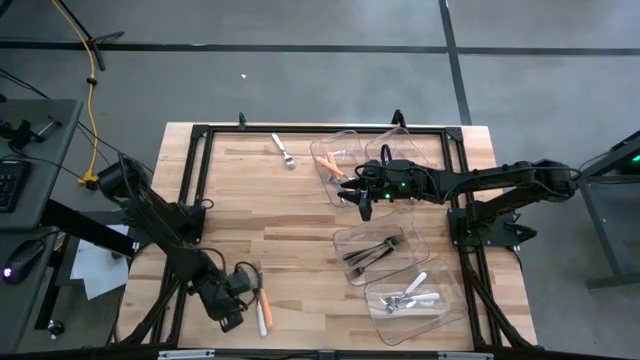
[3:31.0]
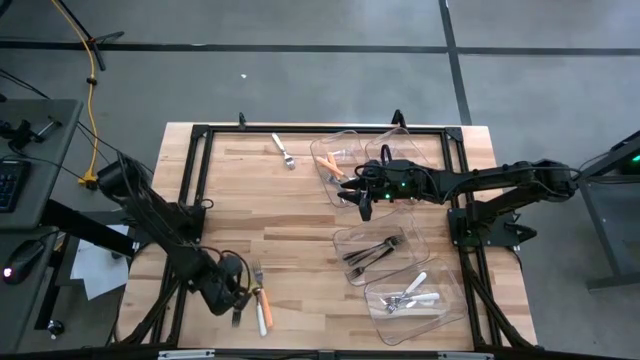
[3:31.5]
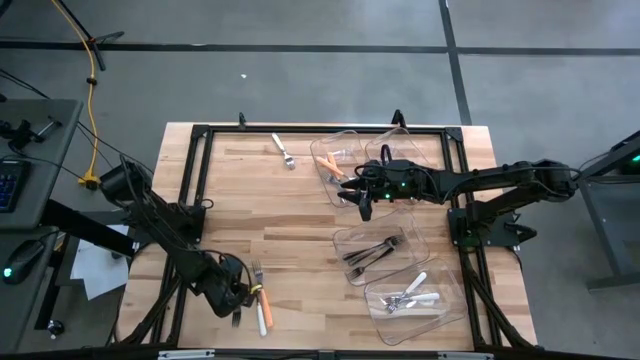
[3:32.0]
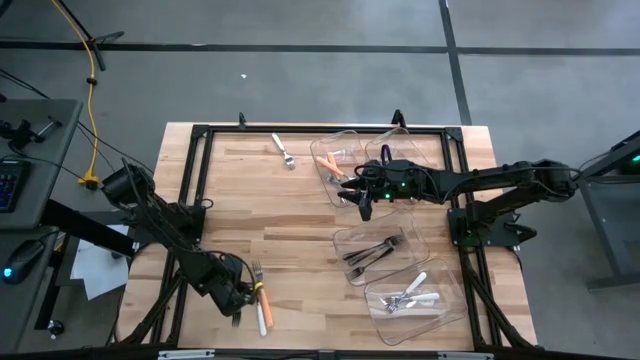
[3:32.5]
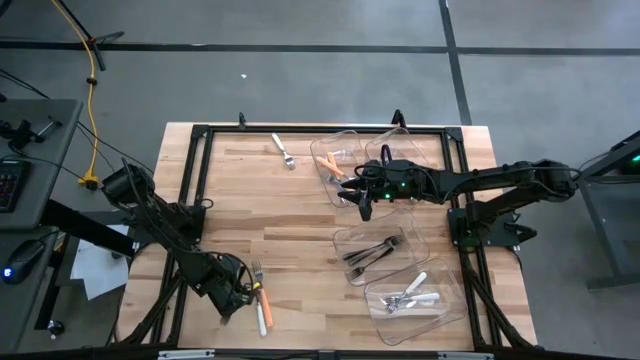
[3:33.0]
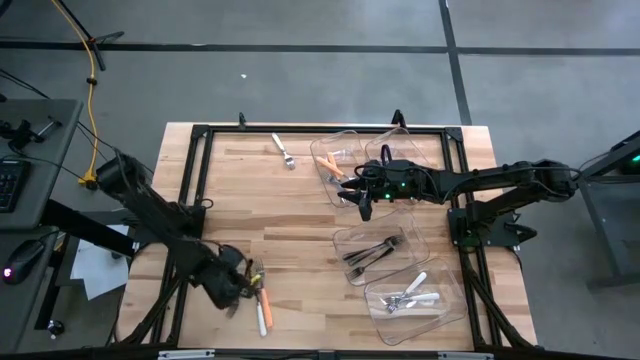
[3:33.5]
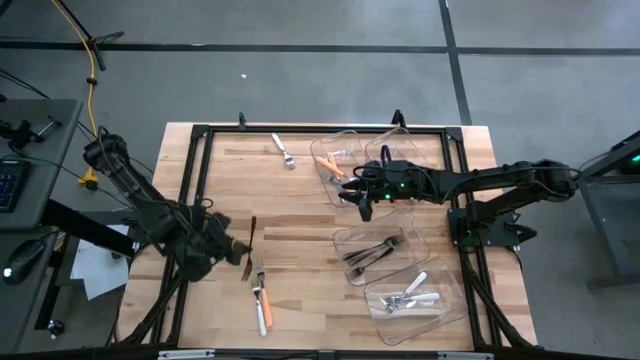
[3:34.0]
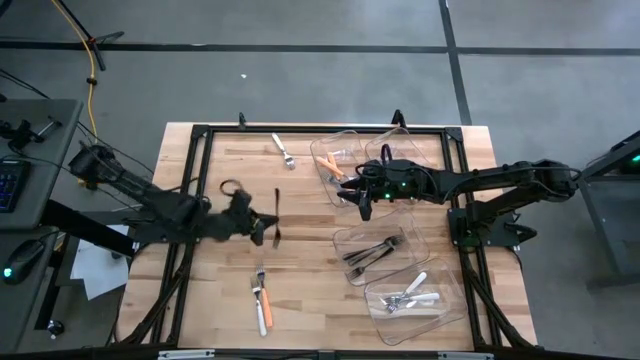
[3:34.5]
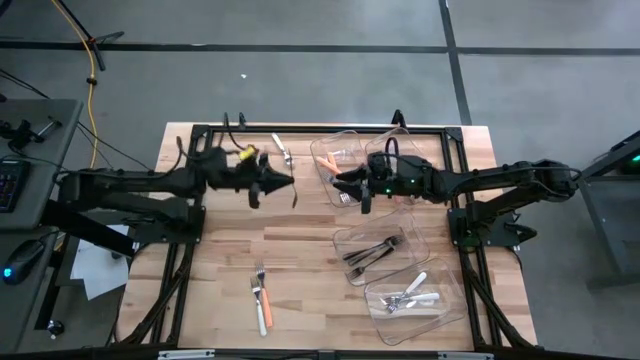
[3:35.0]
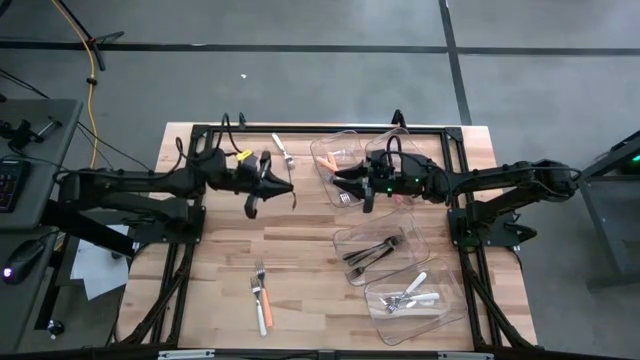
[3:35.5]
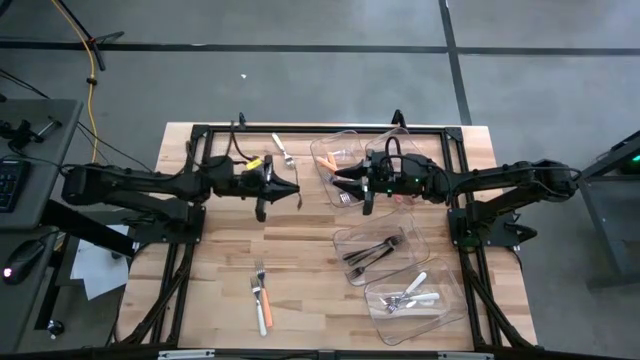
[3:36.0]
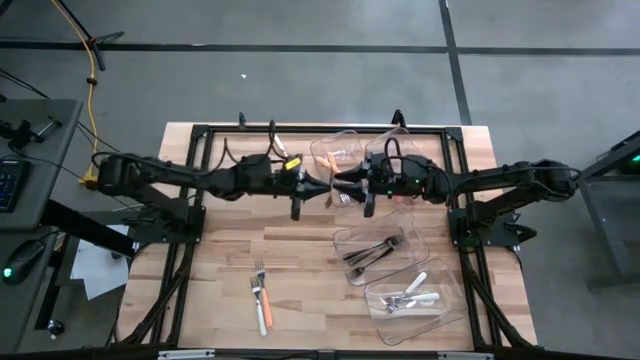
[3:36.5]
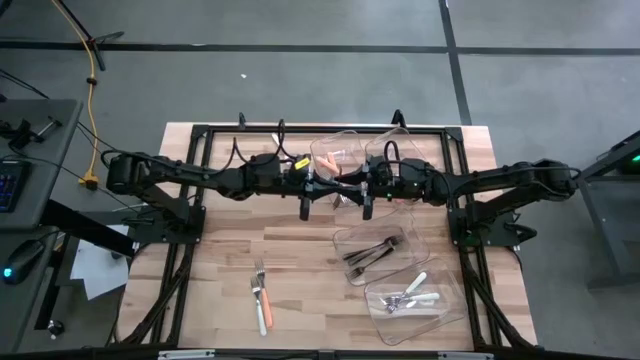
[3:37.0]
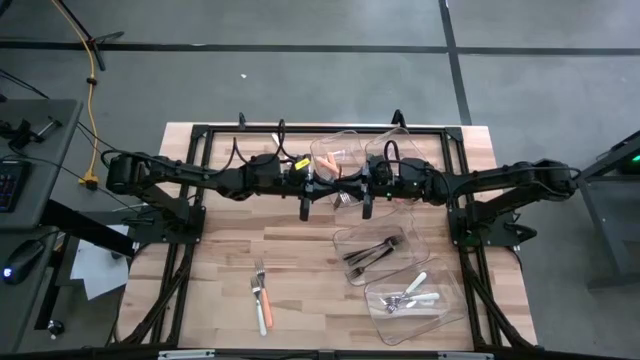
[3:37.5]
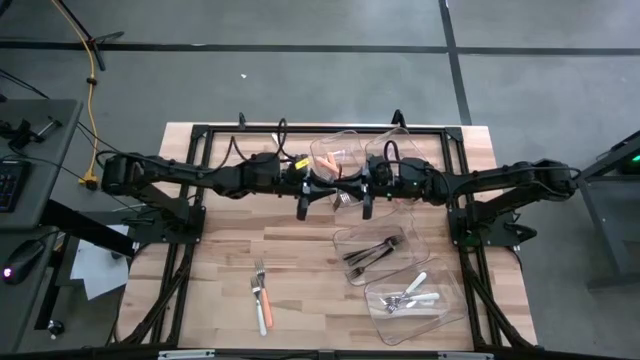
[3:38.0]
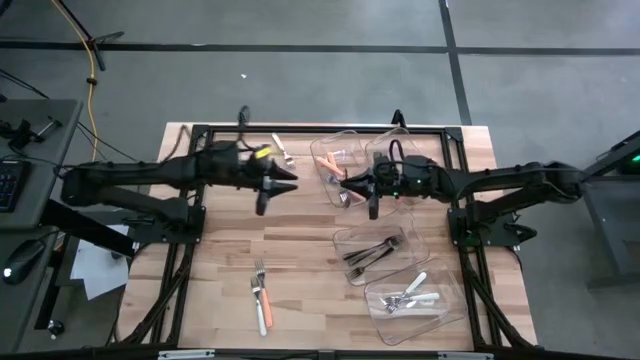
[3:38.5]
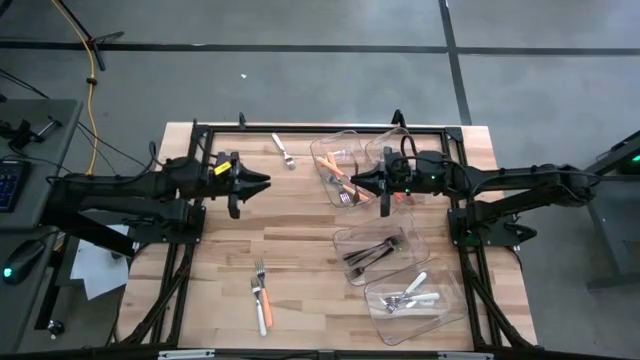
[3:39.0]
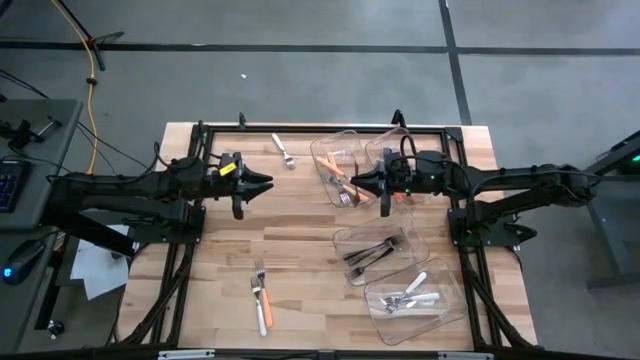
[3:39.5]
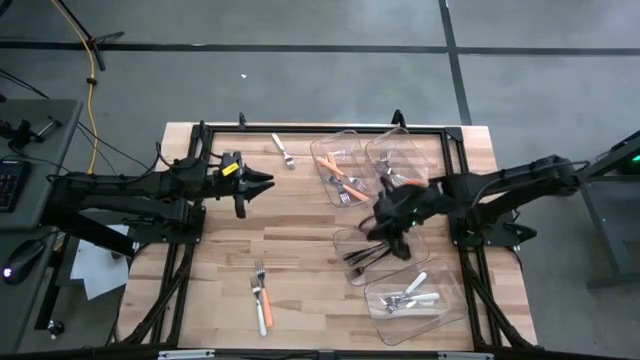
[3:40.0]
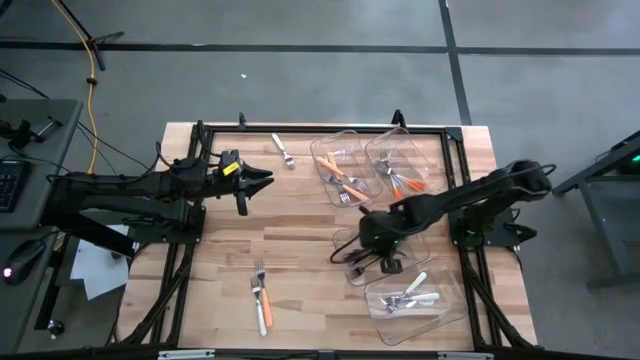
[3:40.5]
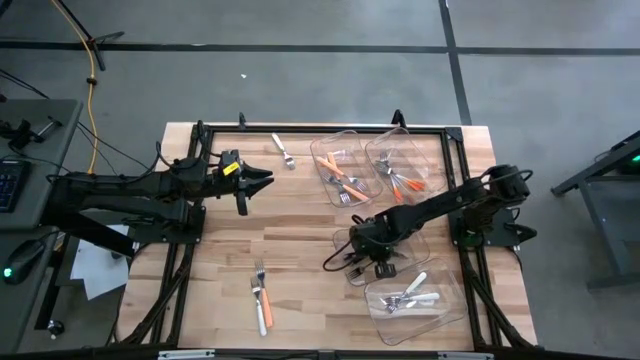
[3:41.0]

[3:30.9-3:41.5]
Task: Sort silverware by color (type)
Put the black fork into the top transparent bin

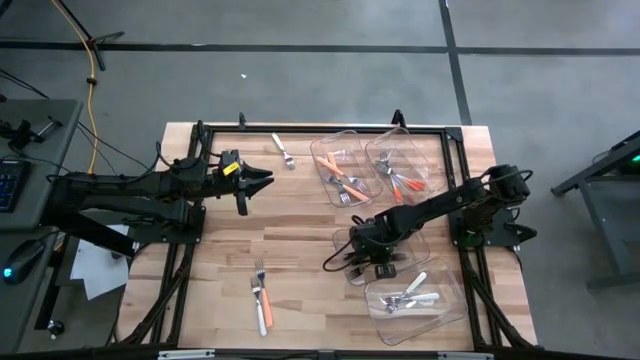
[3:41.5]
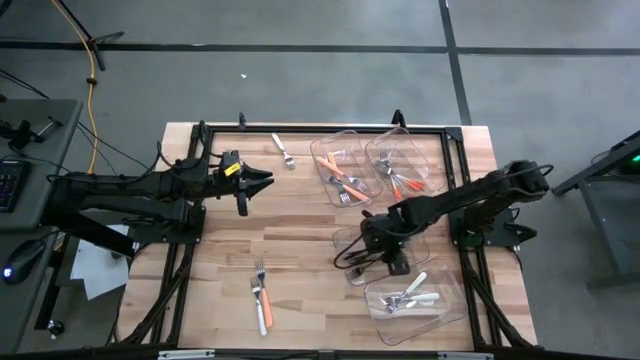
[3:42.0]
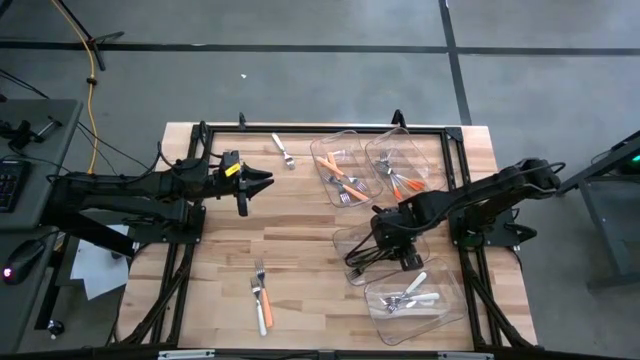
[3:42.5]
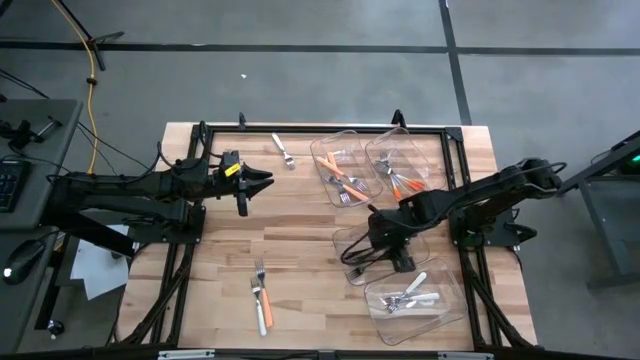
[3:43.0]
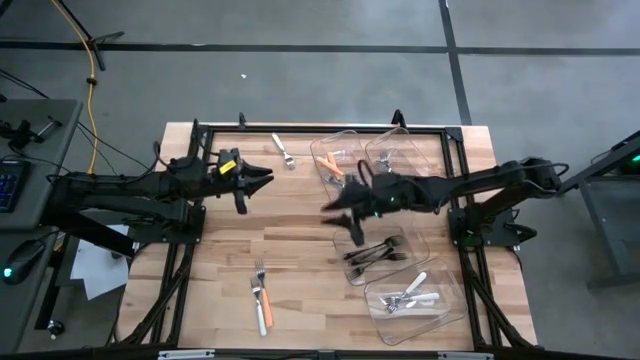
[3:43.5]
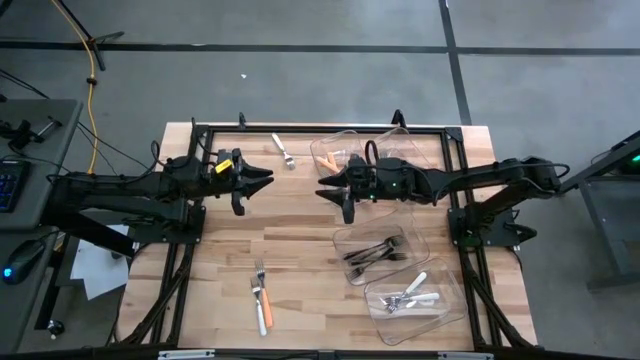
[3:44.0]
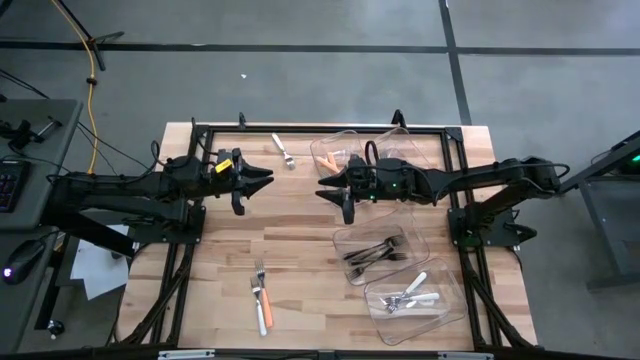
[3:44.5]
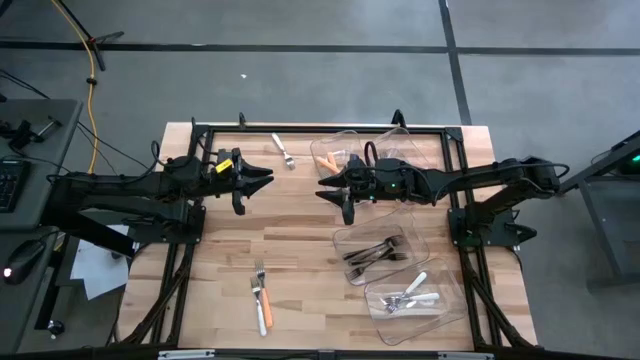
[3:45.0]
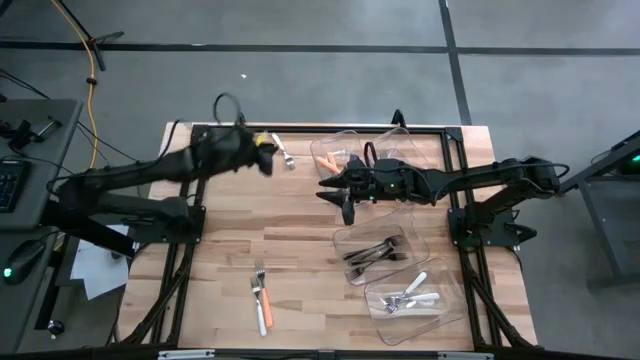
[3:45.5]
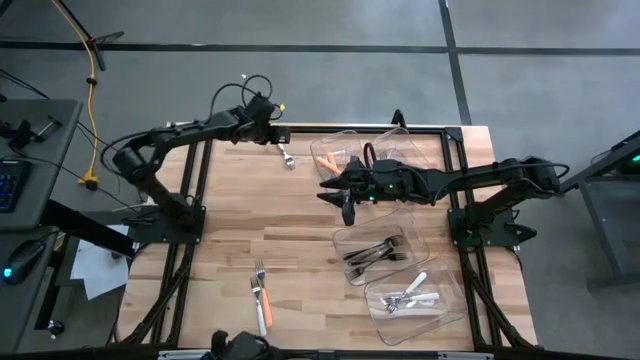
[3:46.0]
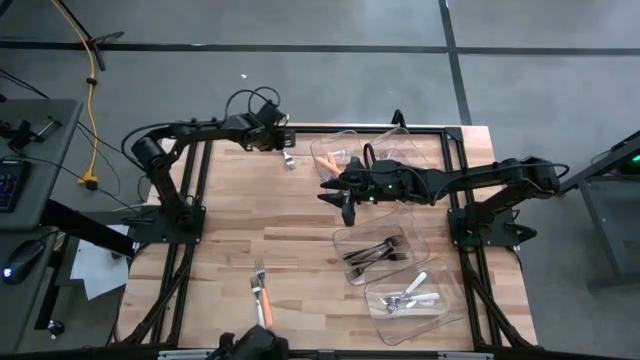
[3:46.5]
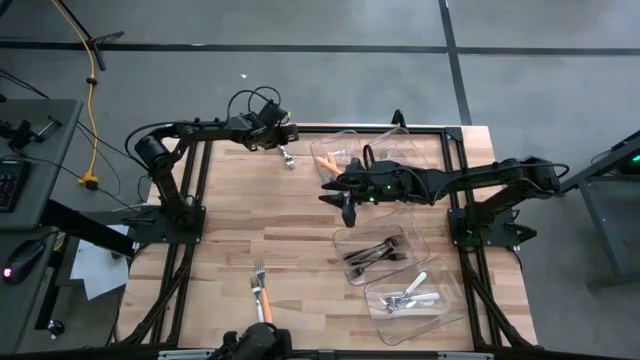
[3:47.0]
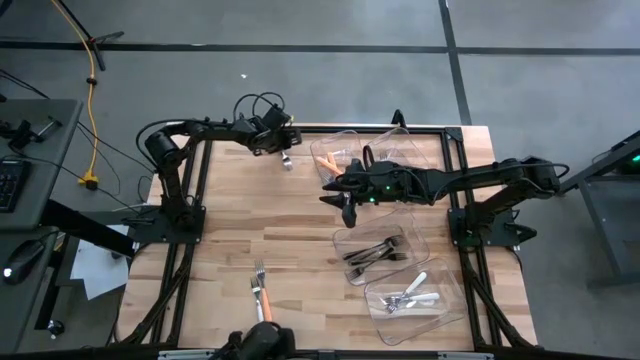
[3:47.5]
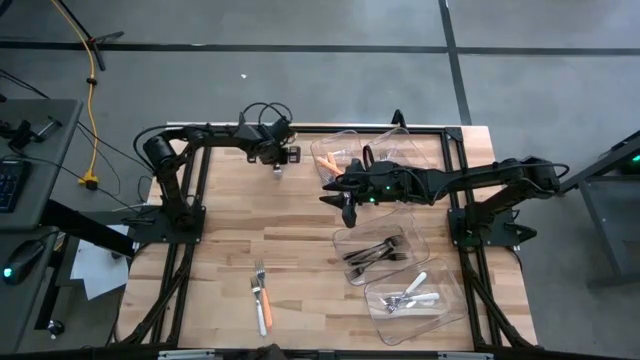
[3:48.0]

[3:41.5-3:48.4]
Move the top white fork to the bottom

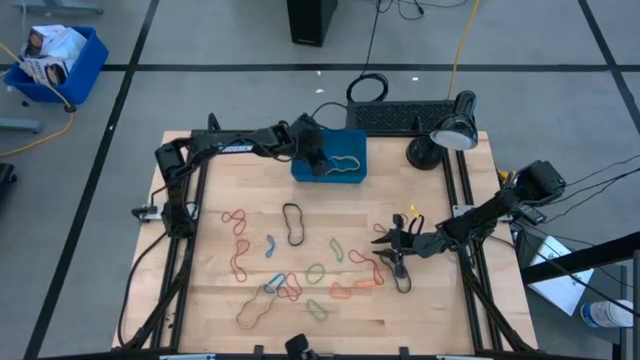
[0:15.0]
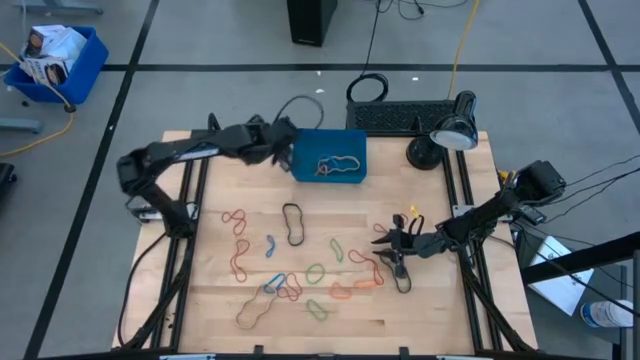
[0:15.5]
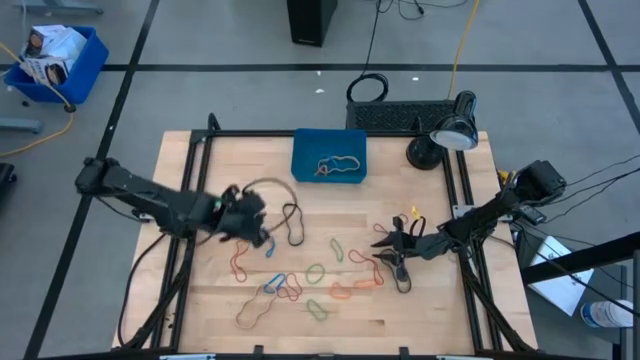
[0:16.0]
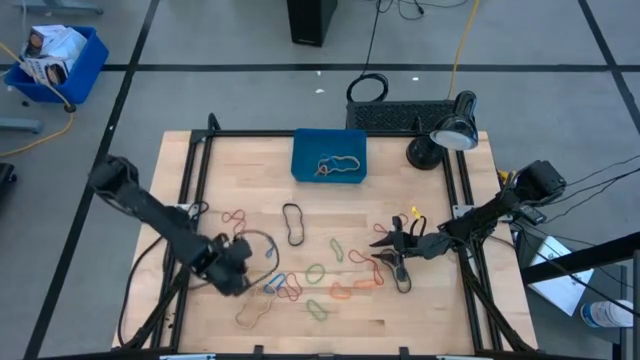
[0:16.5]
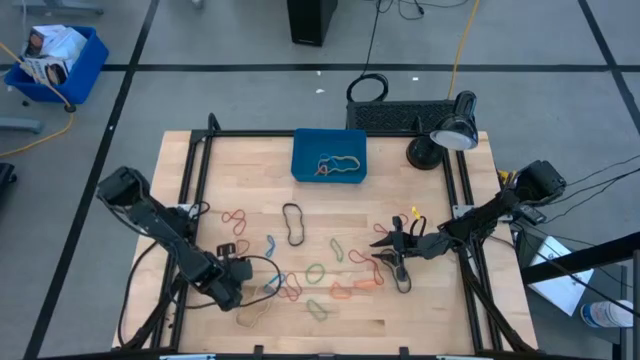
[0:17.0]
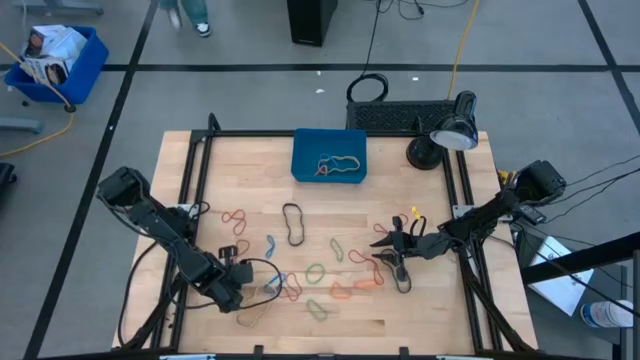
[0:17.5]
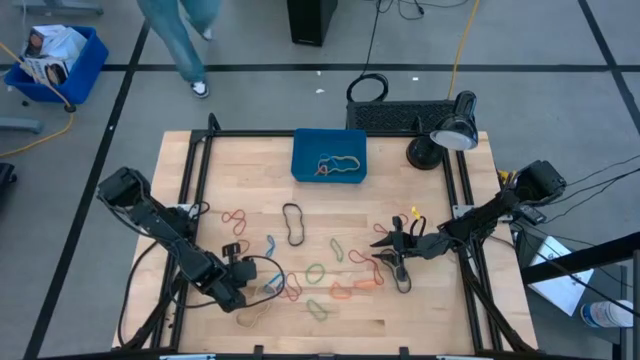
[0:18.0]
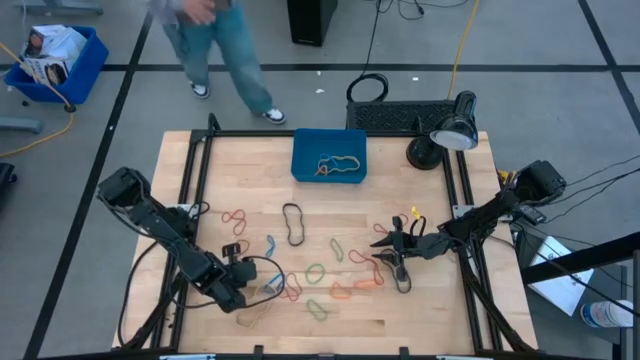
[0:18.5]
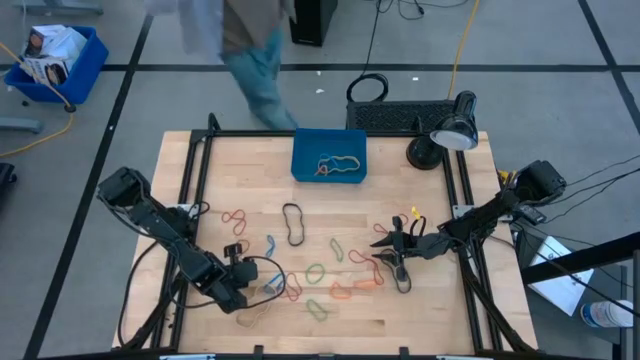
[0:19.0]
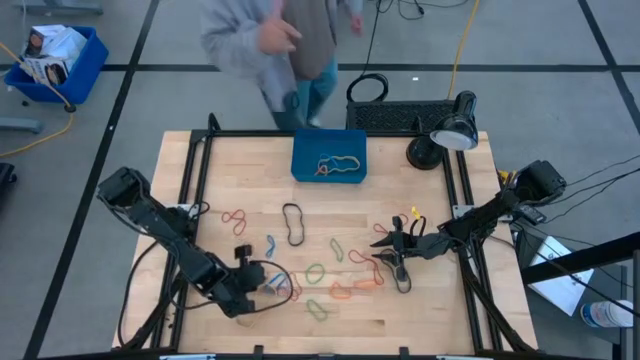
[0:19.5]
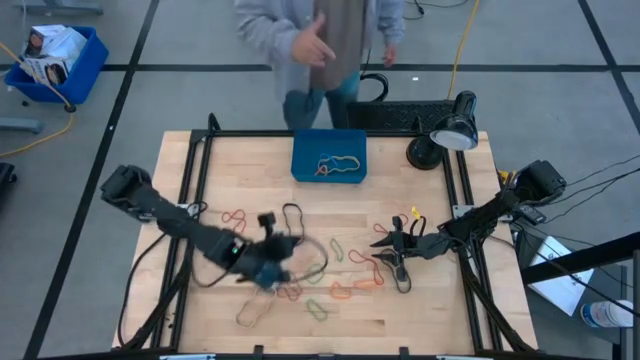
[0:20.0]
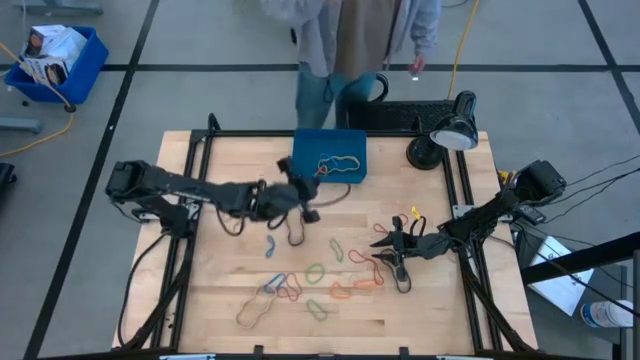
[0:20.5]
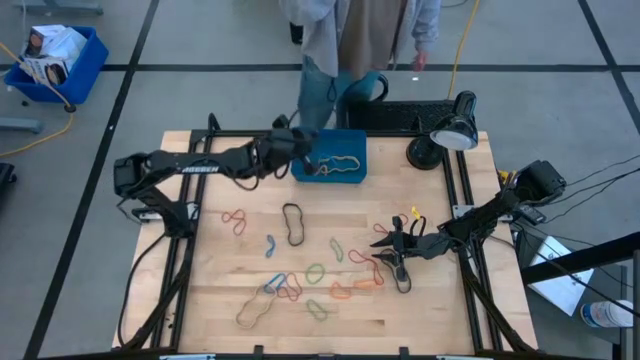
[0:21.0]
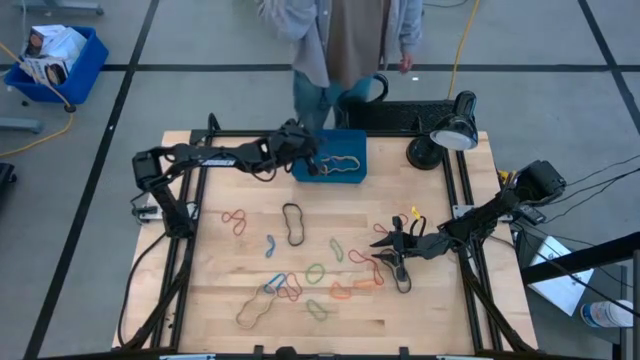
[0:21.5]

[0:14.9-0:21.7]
Task: Pick and place rubber bands into bin
Put the red rubber band into the blue bin
